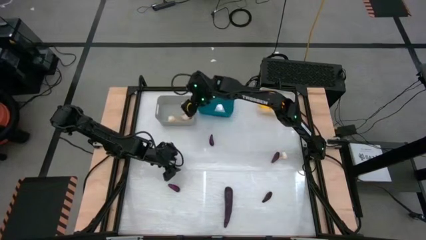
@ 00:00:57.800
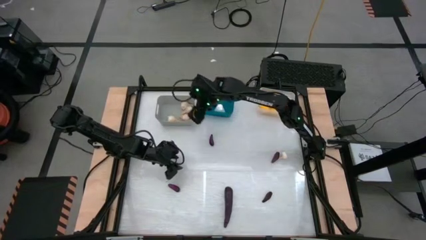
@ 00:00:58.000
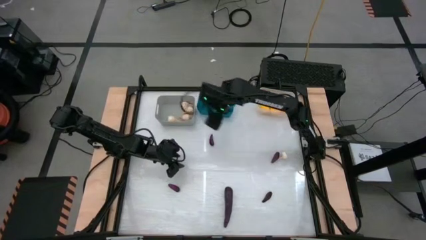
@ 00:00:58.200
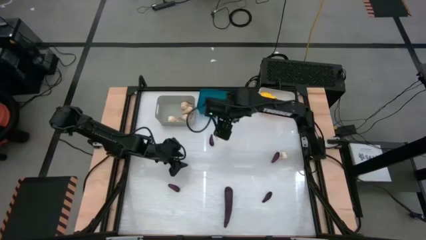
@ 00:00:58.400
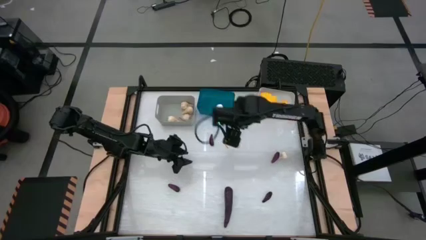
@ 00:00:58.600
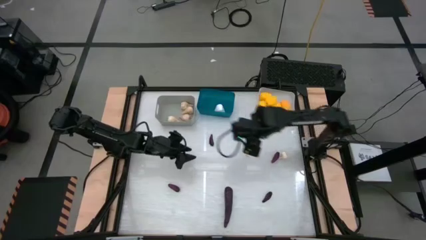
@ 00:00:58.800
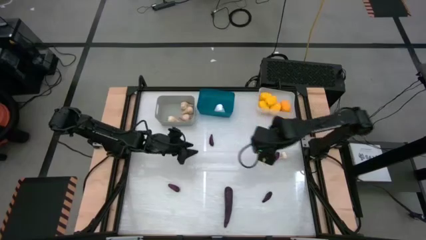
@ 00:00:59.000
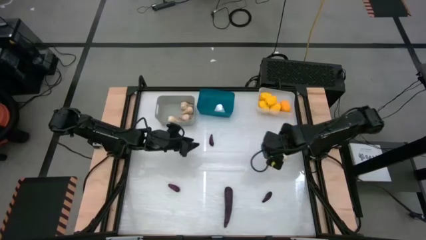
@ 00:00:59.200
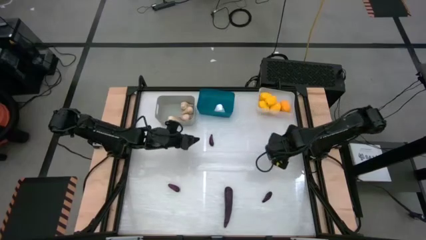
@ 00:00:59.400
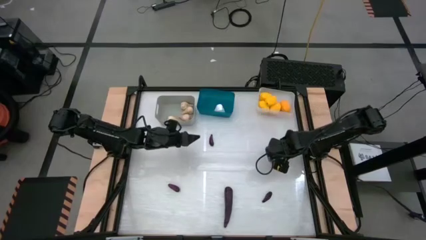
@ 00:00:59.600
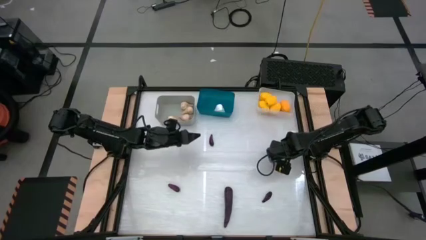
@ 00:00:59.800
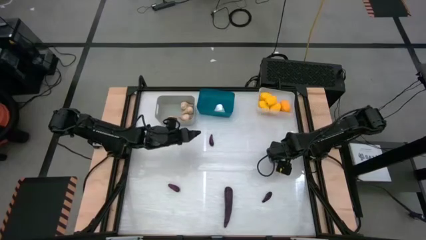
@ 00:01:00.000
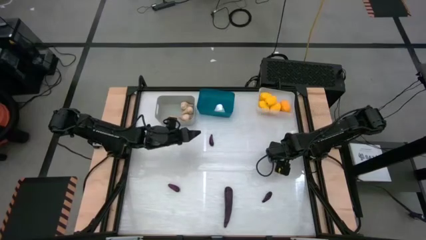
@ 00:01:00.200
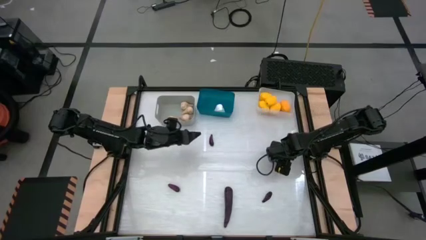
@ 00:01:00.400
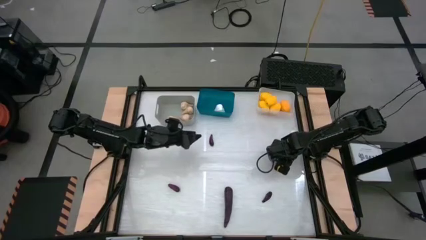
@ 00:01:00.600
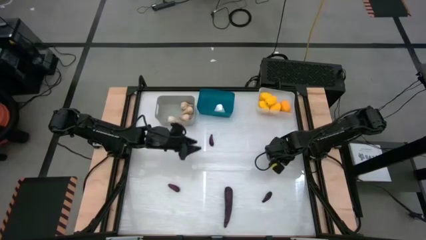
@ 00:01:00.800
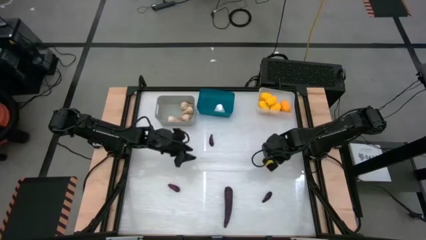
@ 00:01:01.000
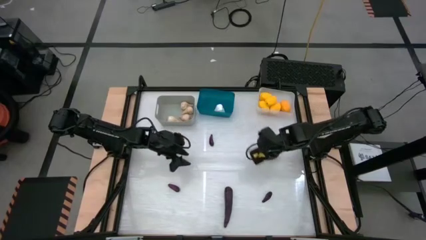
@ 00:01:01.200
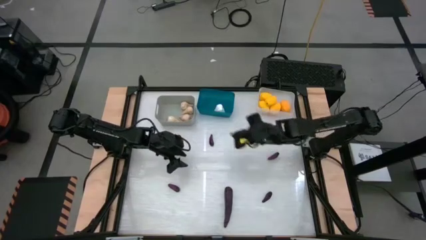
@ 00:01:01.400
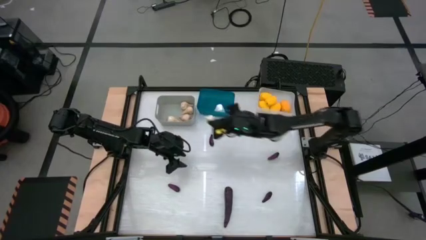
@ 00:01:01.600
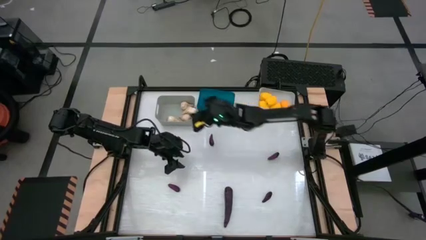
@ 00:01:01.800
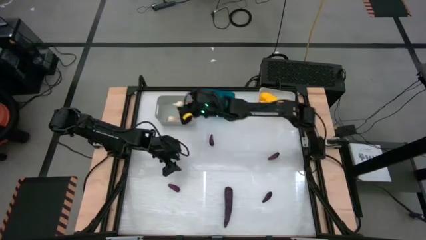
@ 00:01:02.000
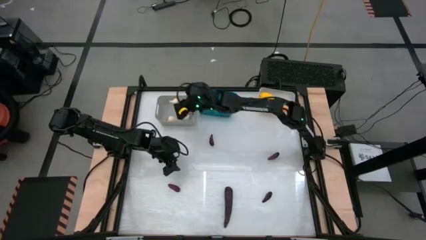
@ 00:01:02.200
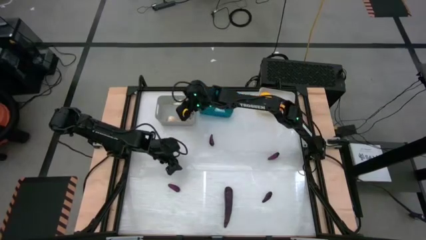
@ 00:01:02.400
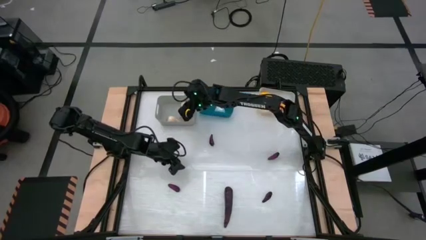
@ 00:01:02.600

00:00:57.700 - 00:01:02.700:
Task: Sort produce into baskets
Put the garlic into the gray bin

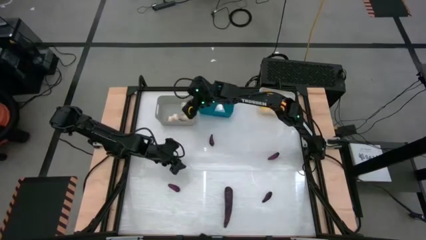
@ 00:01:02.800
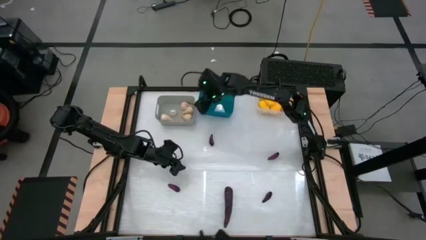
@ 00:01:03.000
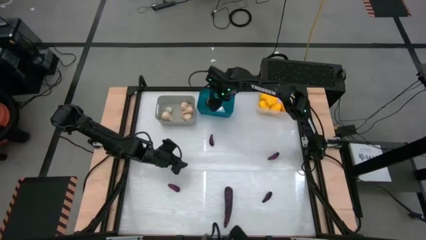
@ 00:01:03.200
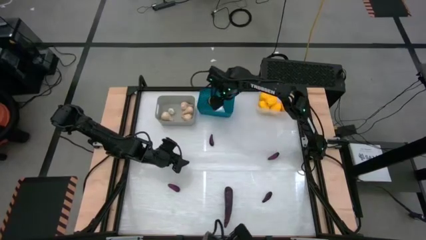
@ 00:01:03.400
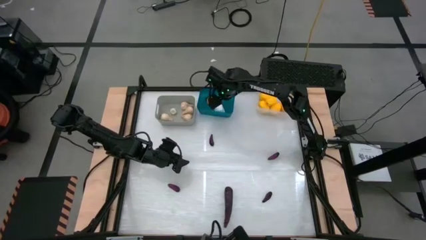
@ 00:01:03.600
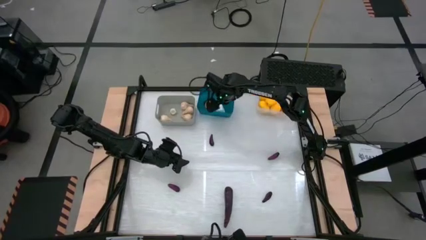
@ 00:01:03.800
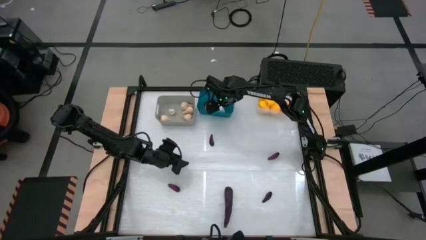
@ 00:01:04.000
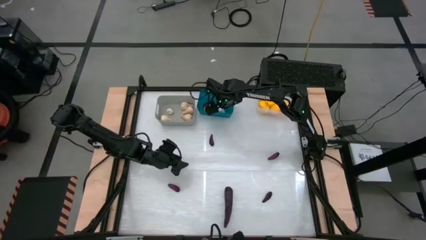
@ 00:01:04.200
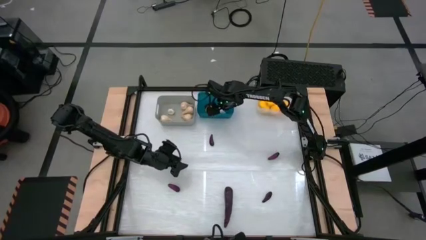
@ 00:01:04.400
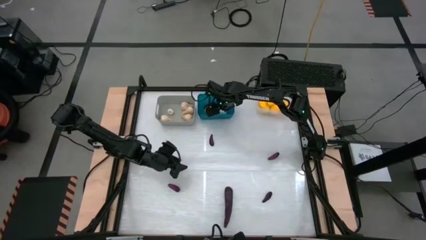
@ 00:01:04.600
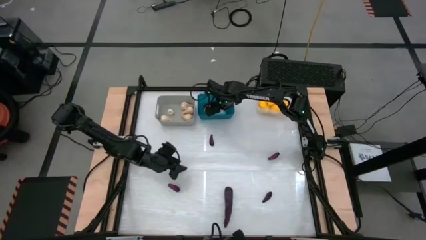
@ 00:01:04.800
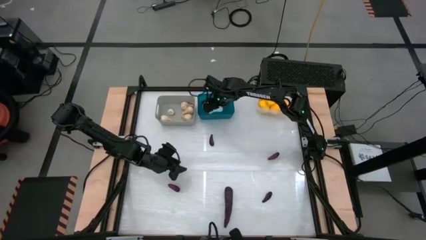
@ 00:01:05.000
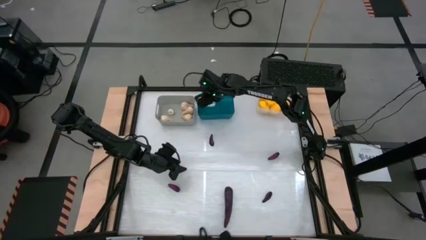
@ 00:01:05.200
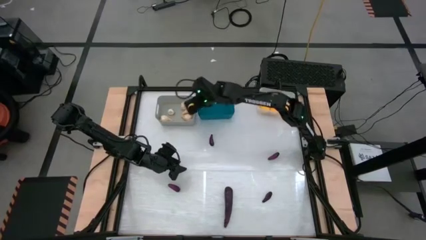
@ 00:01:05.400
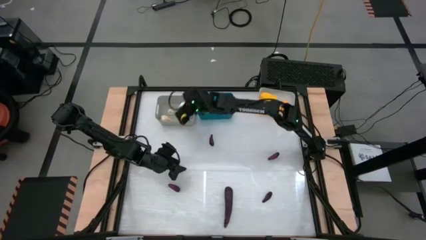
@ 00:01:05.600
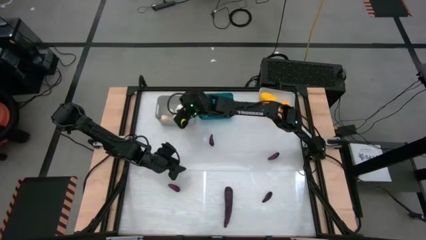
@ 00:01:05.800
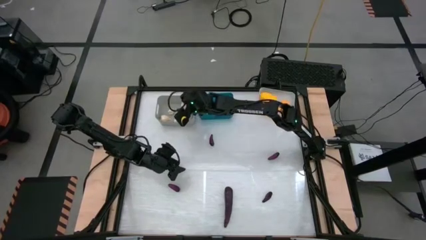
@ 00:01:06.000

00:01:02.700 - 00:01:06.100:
Put the garlic from the blue bin into the gray bin

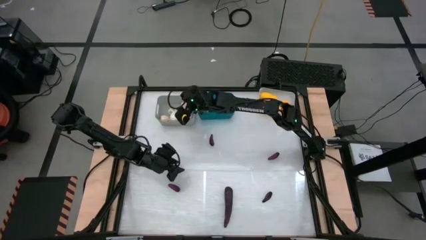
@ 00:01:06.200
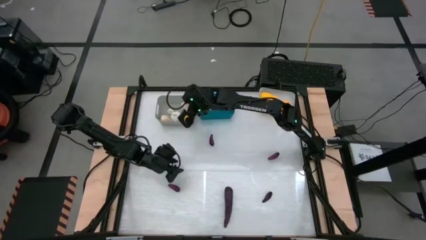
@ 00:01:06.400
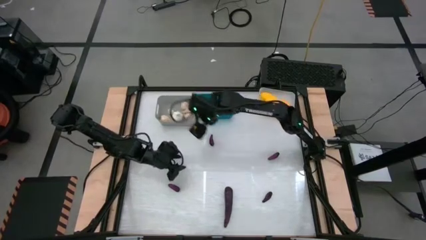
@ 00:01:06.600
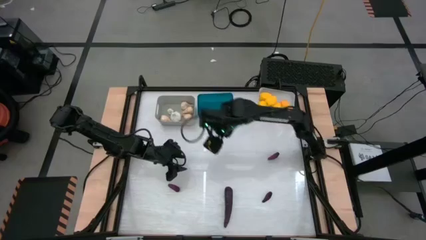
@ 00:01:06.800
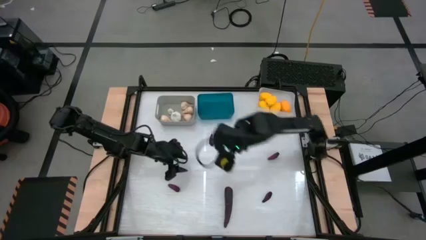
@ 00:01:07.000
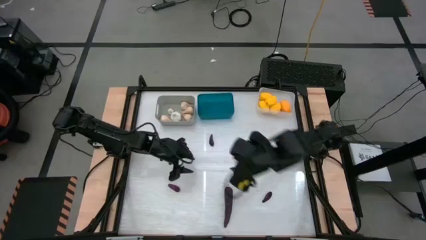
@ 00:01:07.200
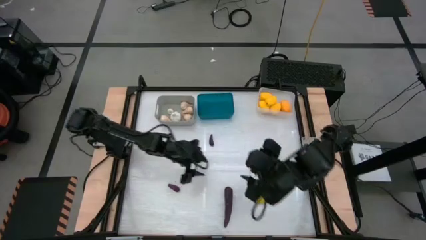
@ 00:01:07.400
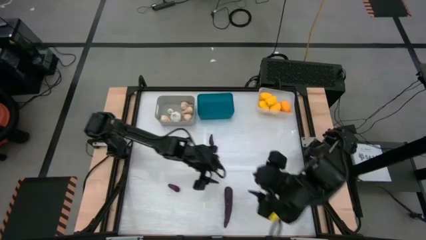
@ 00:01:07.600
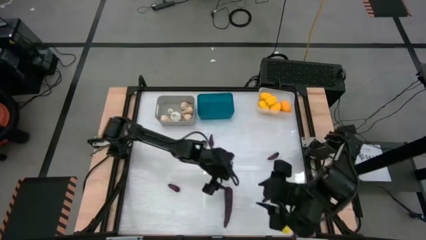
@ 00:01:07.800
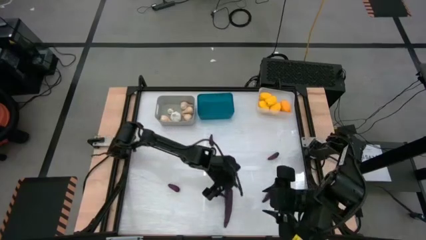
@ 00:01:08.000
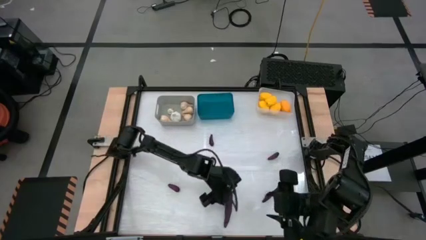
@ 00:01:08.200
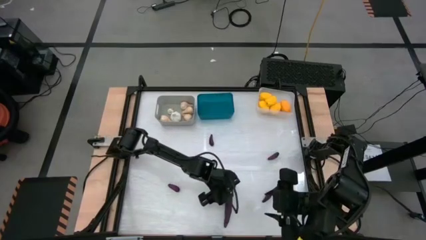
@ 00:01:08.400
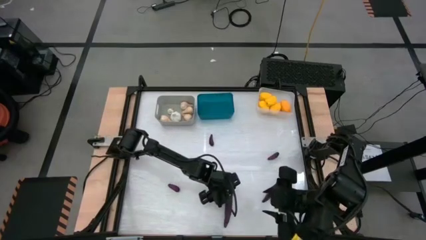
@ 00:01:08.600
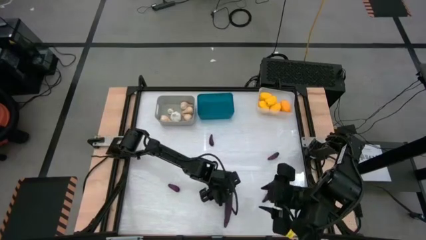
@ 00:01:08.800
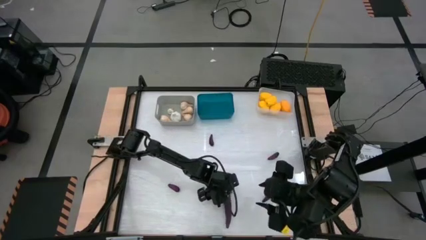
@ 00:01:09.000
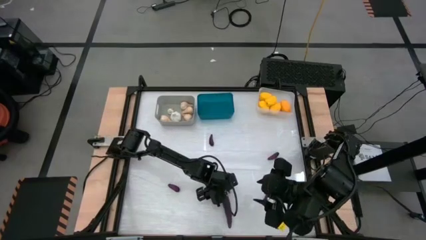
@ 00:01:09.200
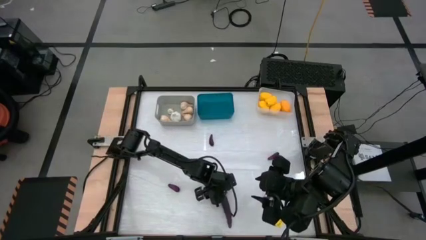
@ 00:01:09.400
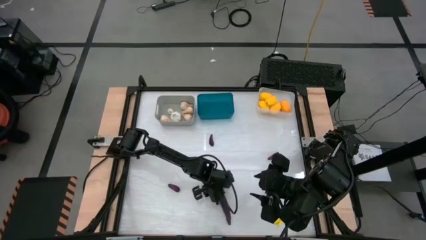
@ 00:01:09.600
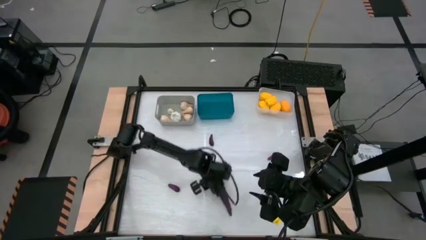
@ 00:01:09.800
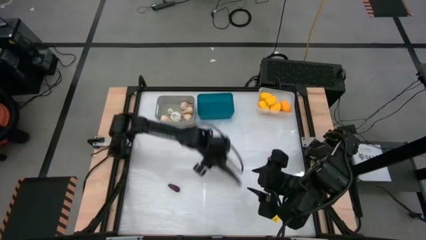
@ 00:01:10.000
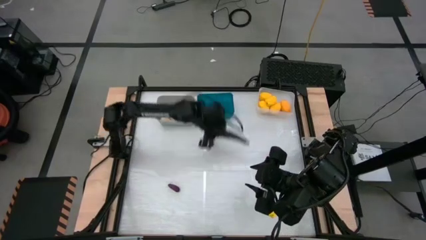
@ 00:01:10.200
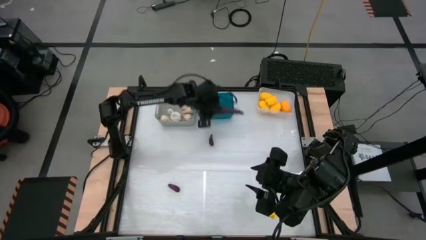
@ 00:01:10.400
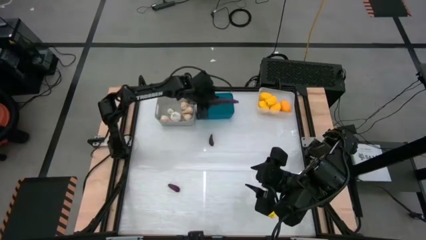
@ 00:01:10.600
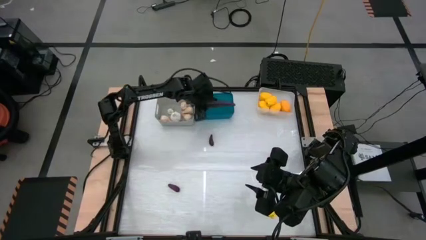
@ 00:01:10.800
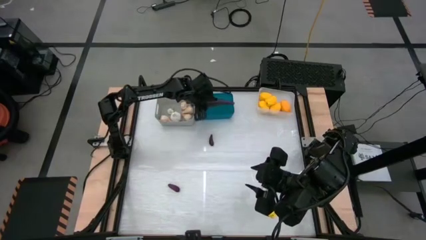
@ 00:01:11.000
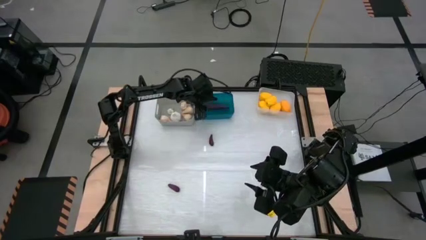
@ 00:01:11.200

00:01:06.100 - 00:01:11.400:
Put the eggplant into the blue bin

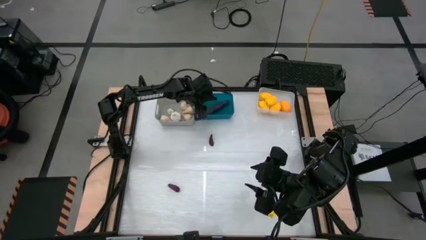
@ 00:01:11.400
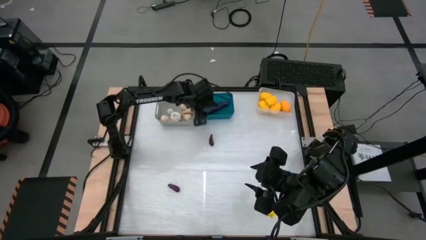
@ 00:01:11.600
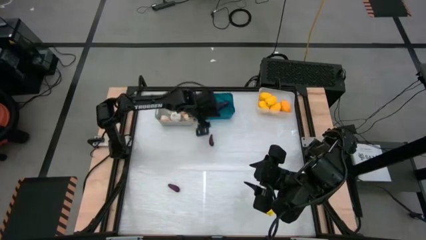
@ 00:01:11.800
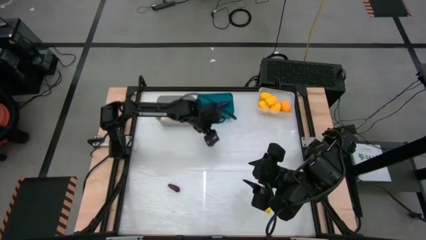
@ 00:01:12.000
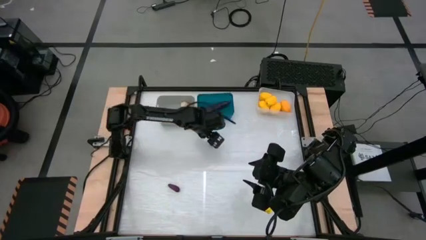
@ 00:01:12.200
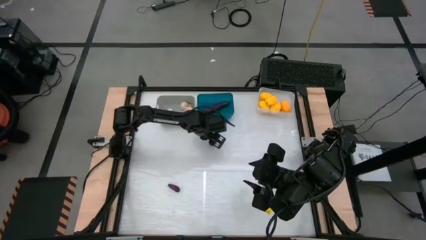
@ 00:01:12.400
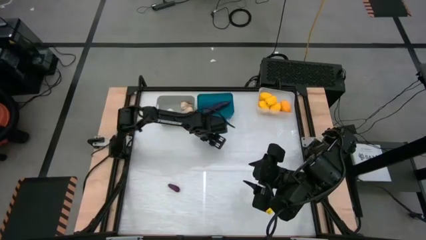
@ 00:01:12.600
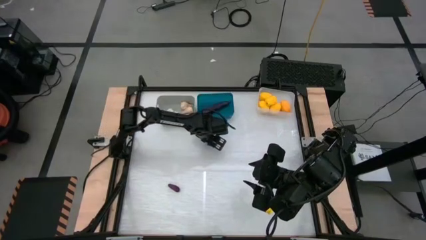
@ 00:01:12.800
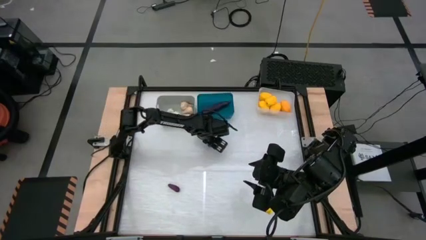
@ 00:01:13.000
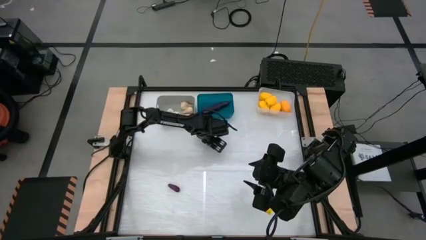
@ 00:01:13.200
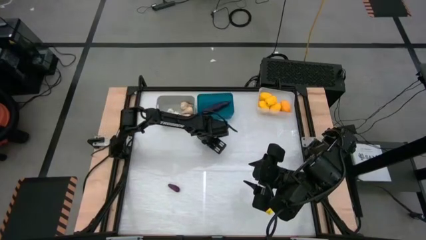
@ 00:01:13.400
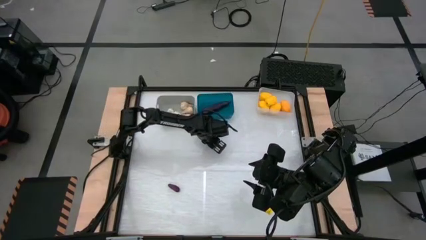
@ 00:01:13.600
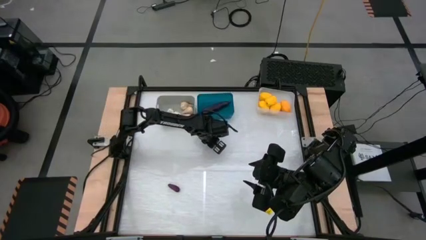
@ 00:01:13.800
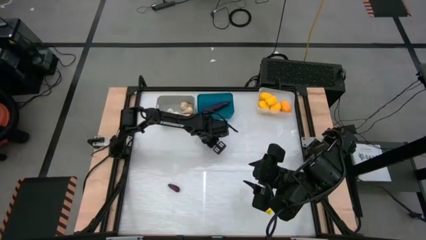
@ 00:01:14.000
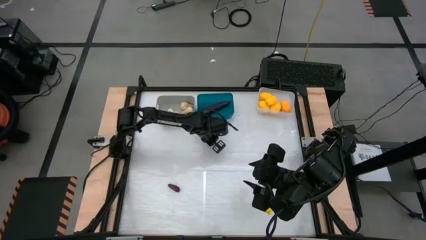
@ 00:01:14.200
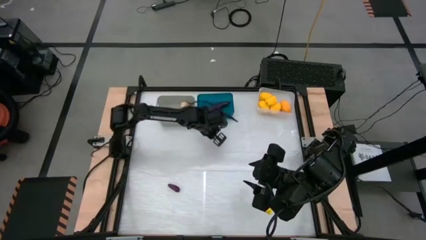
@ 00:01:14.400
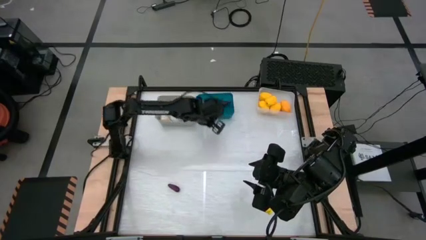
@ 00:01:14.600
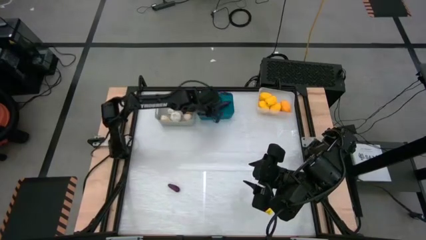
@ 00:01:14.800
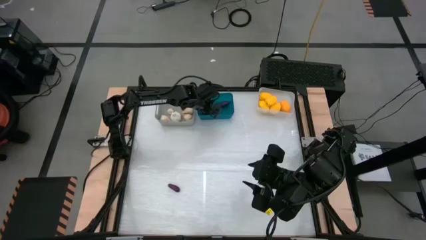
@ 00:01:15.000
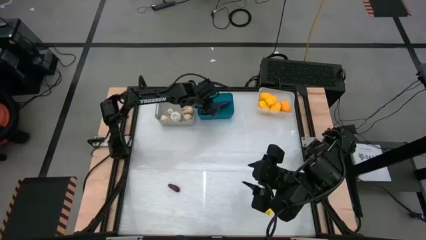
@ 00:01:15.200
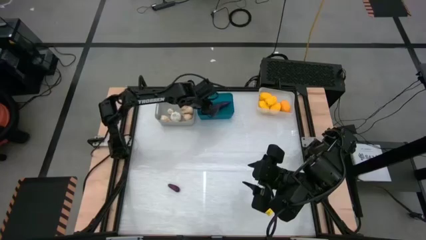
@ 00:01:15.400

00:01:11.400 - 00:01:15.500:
Put the eggplant into the blue bin
